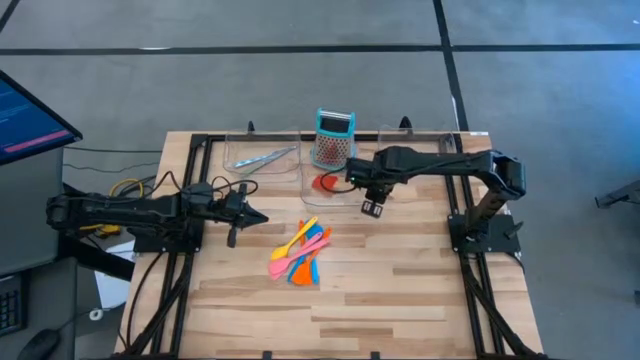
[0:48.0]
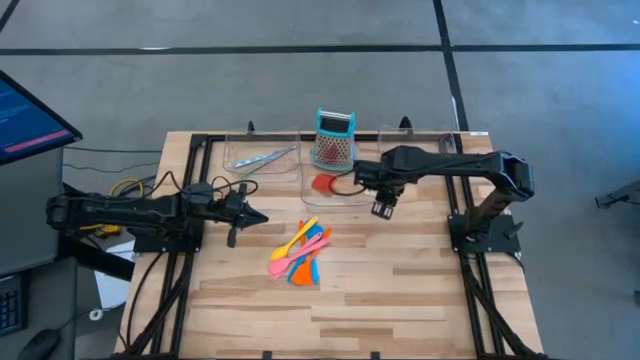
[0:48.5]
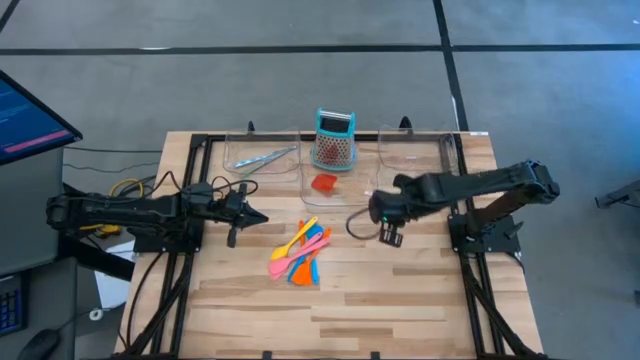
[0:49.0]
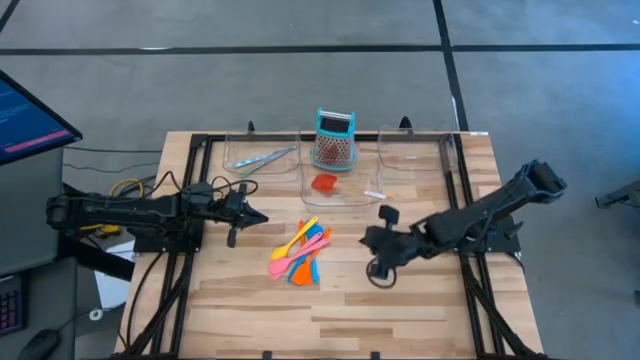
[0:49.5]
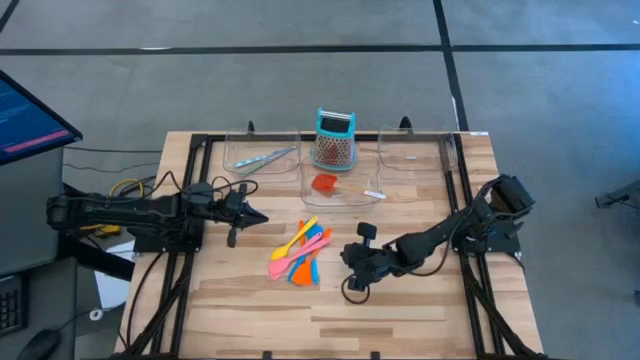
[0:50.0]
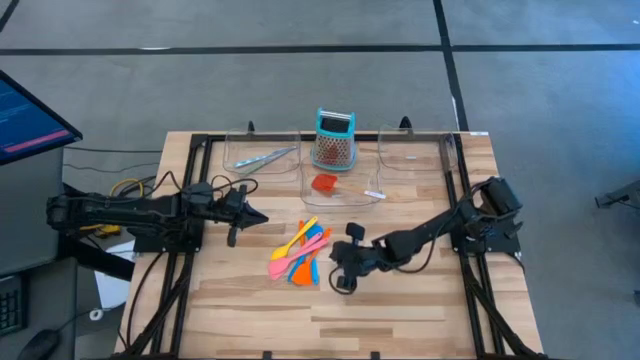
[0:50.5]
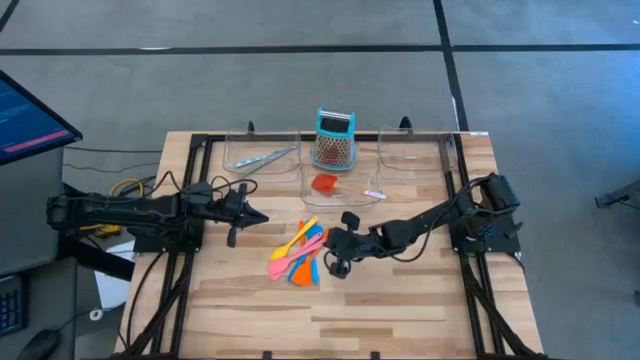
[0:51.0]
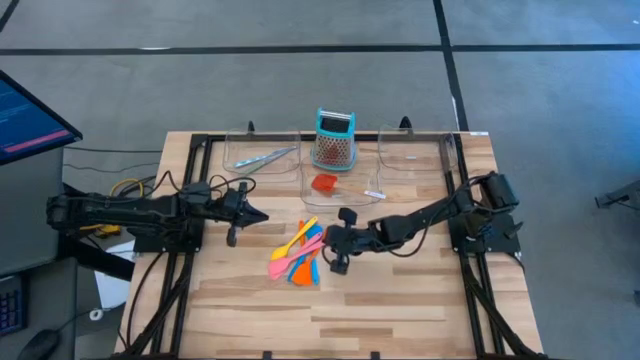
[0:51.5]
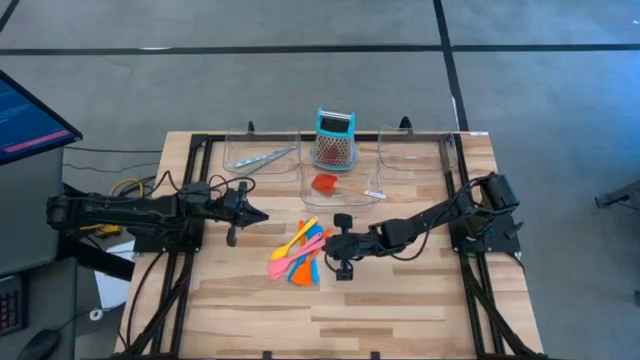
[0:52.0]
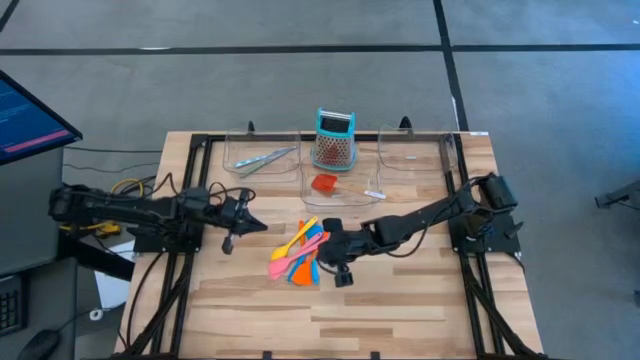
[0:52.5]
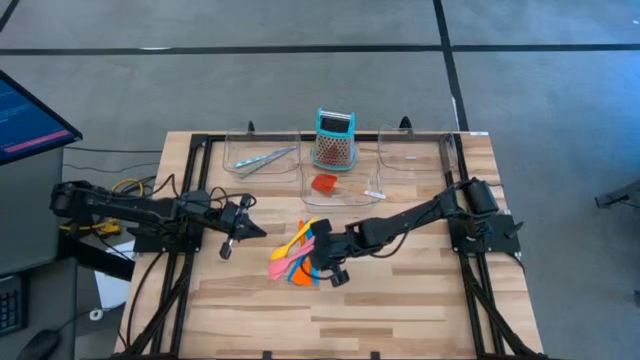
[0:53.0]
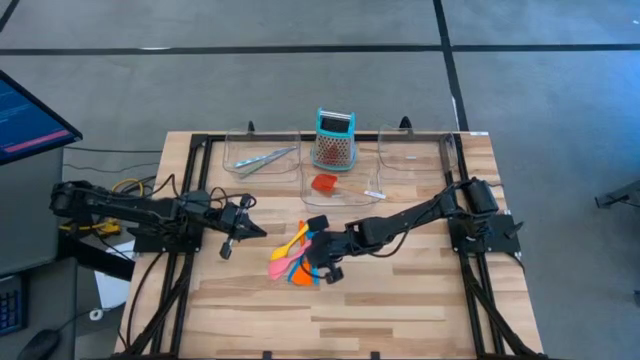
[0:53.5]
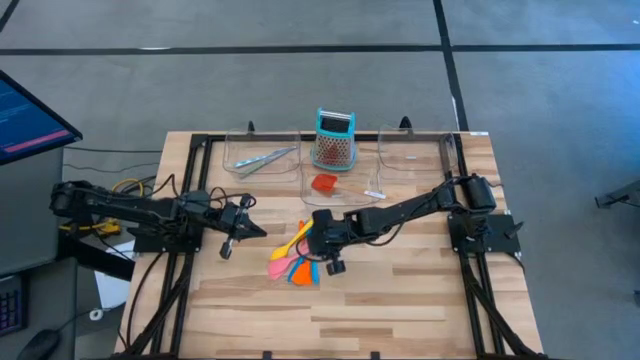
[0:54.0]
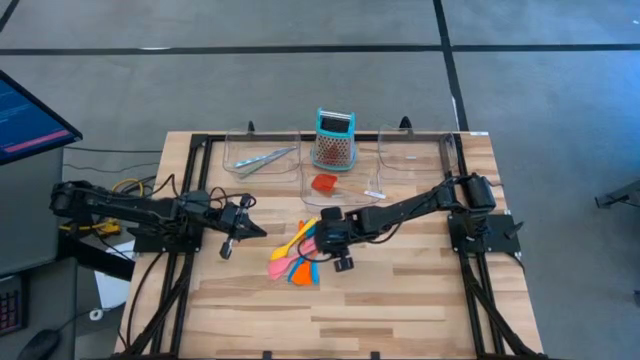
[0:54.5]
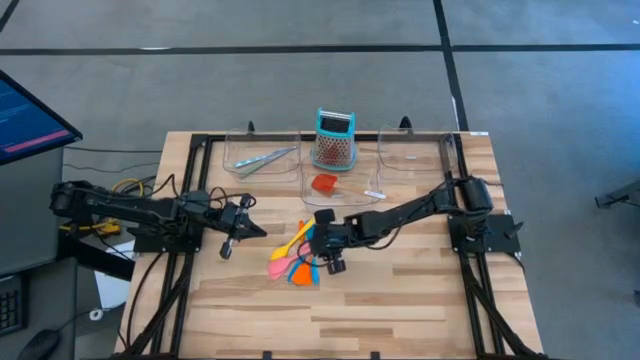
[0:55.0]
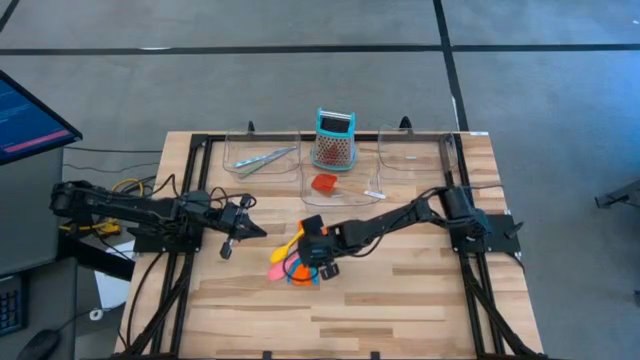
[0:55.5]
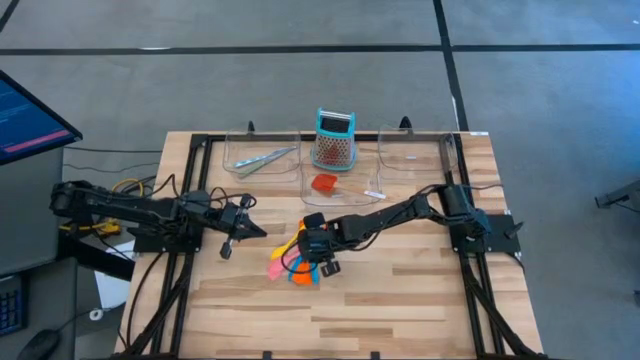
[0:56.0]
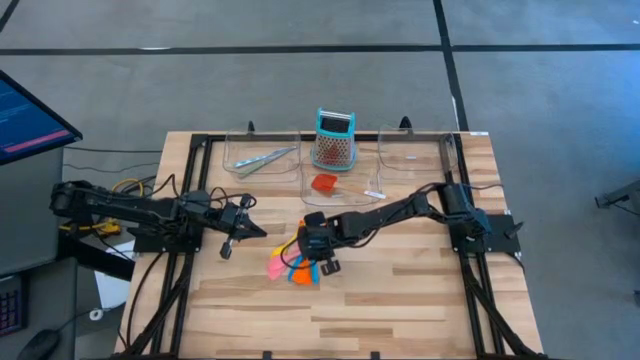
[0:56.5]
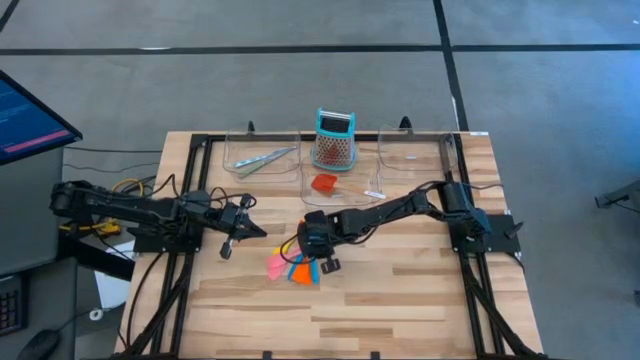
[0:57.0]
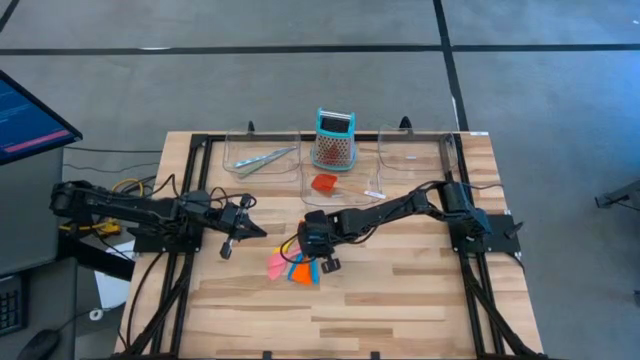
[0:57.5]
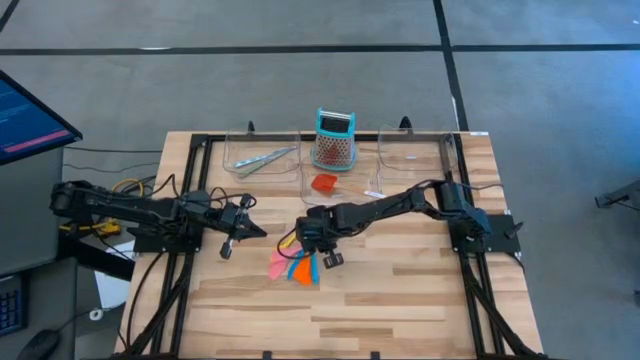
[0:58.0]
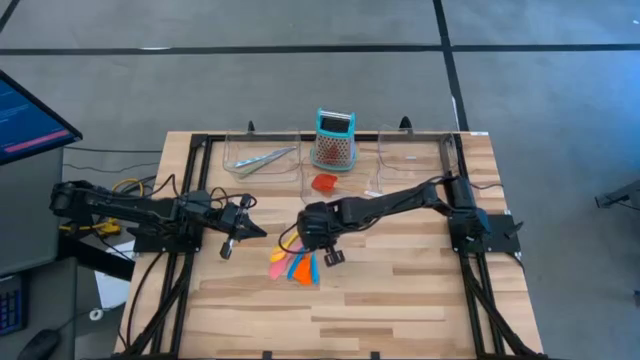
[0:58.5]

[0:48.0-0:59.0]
Task: Pick & Place Kitchen Items
Put the pink spatula into the middle transparent bin

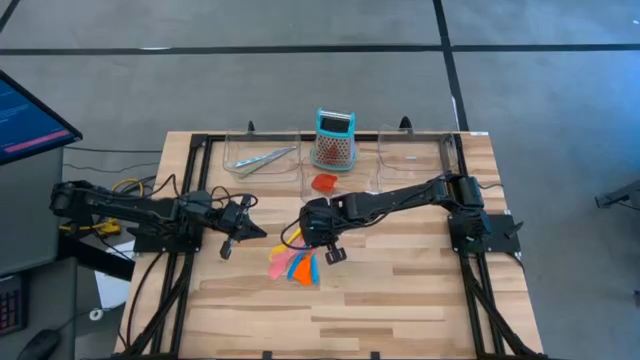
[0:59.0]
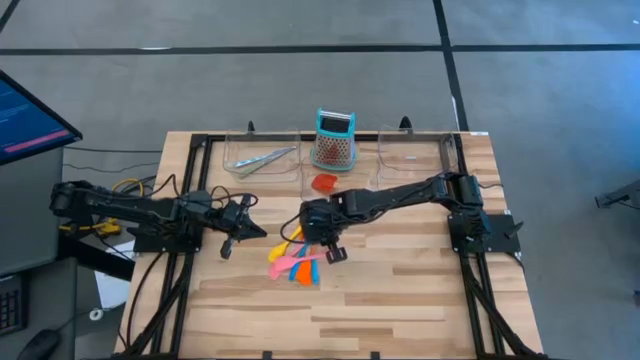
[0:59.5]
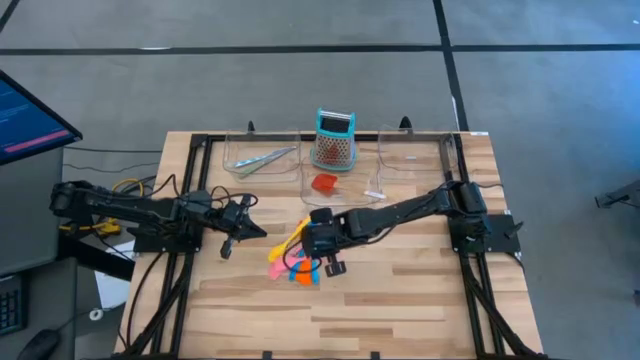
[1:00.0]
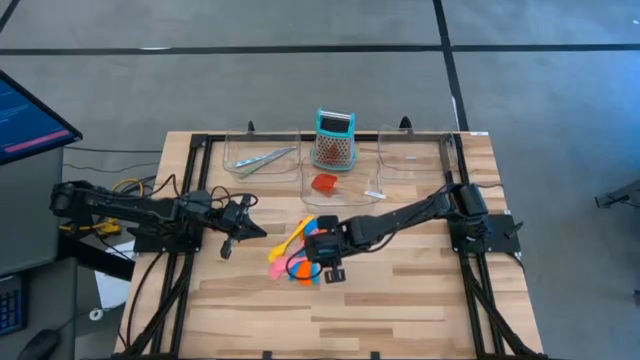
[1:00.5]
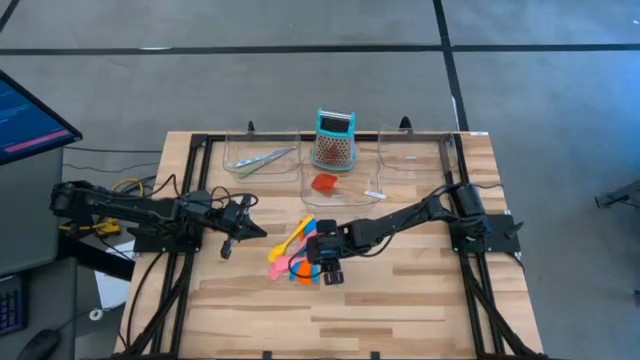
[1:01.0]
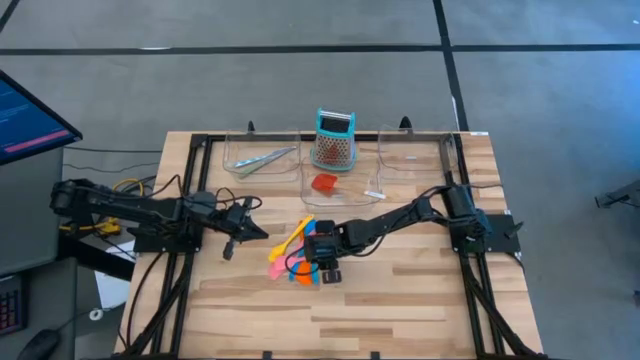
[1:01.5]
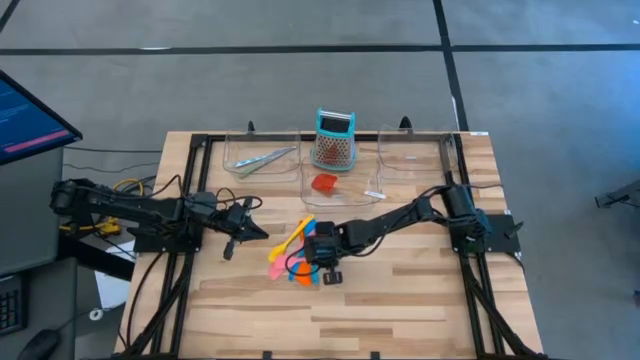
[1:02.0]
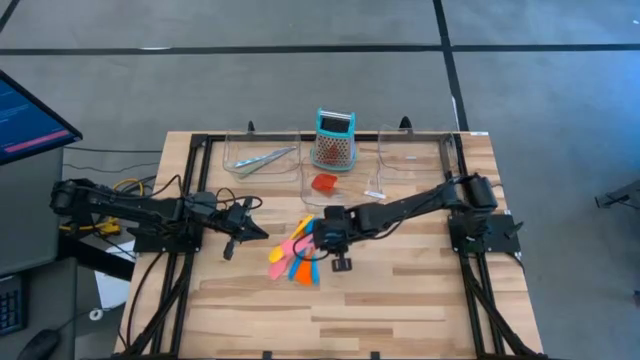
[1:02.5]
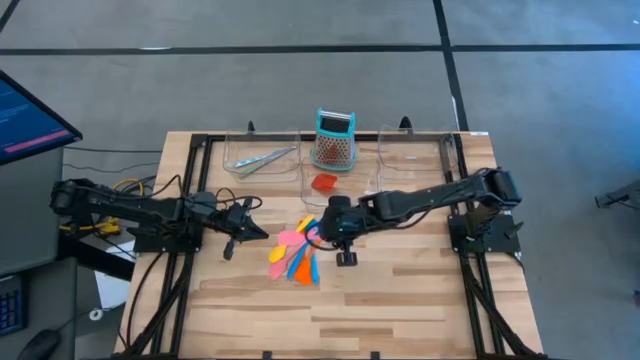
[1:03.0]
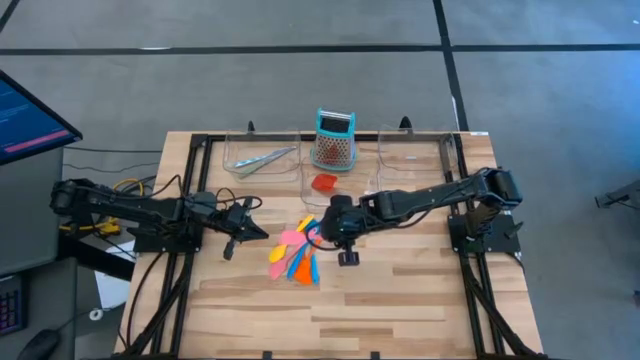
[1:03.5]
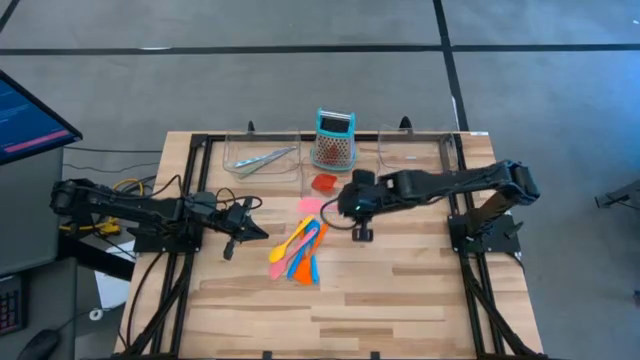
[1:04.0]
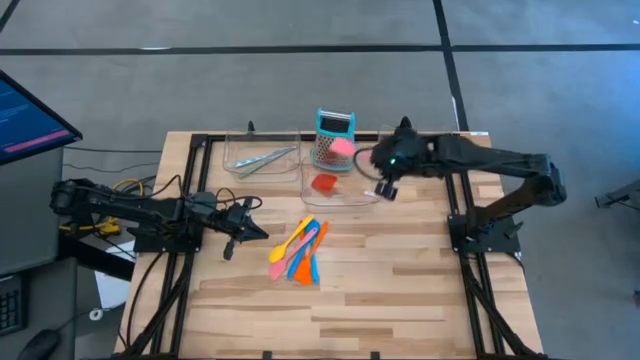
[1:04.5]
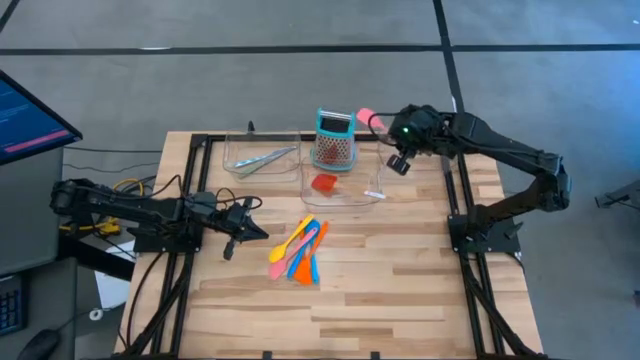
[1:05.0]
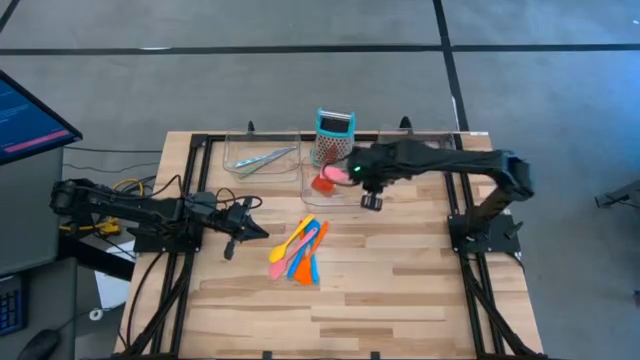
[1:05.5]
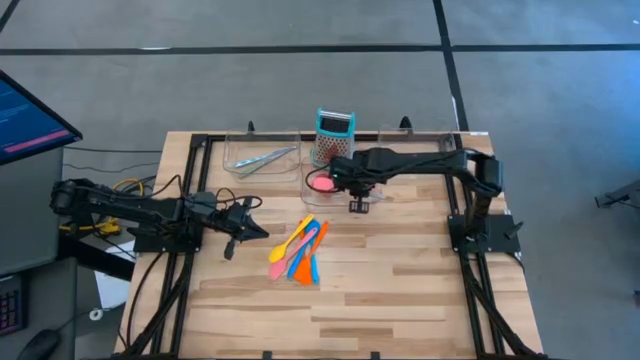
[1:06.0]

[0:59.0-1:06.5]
Put the pink spatula into the middle transparent bin

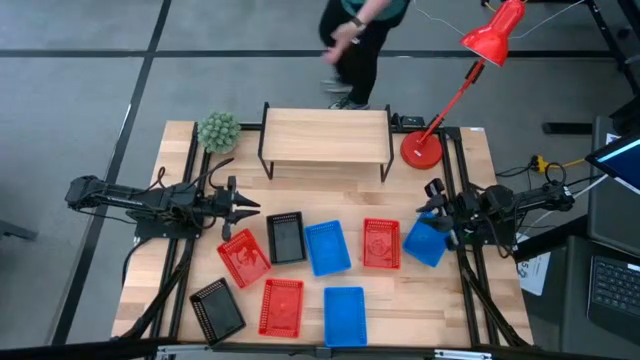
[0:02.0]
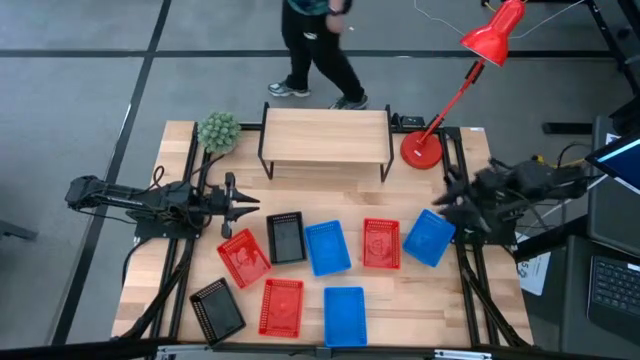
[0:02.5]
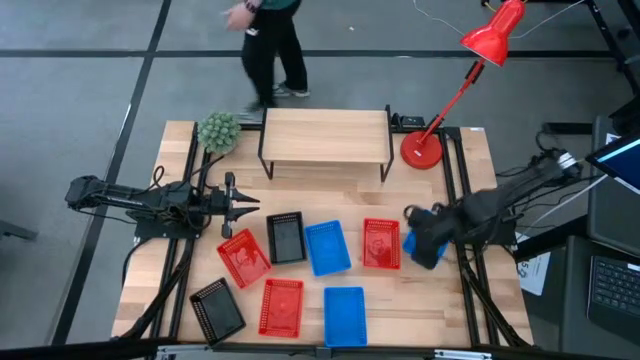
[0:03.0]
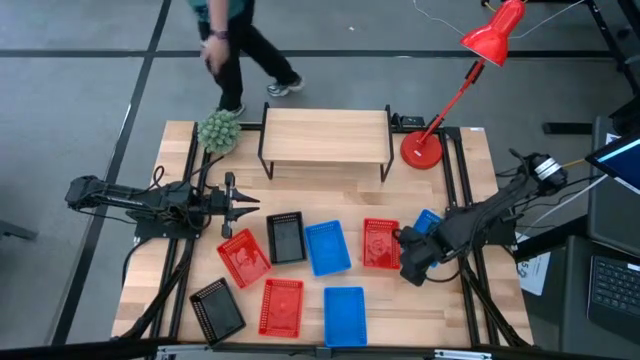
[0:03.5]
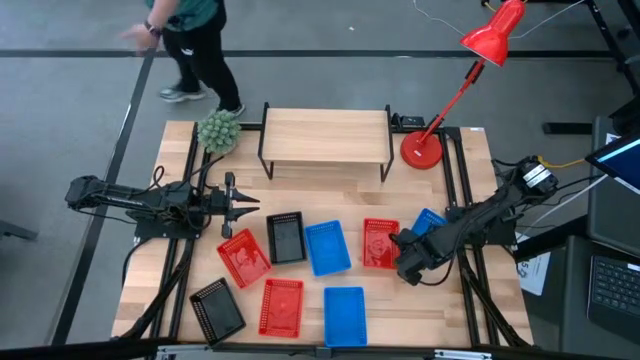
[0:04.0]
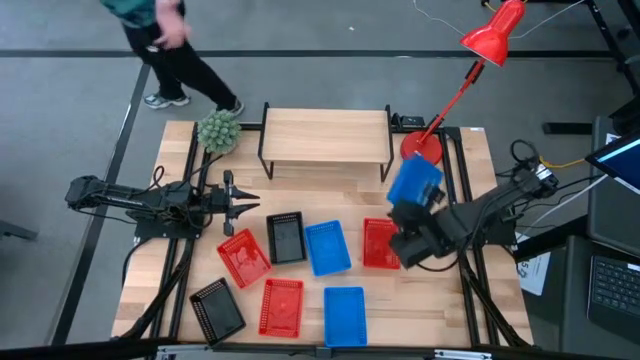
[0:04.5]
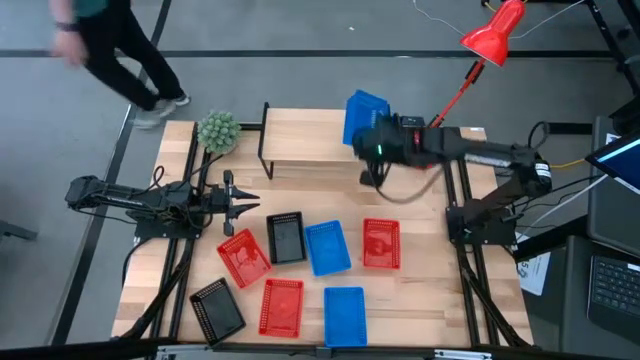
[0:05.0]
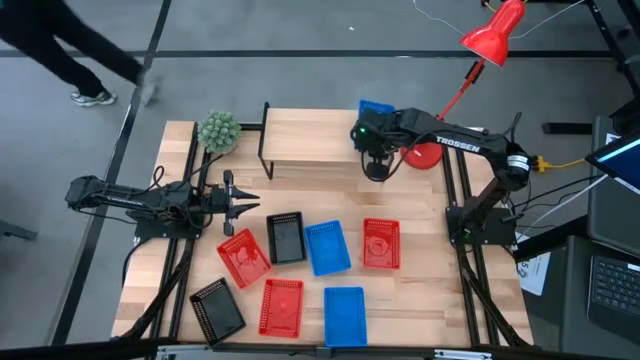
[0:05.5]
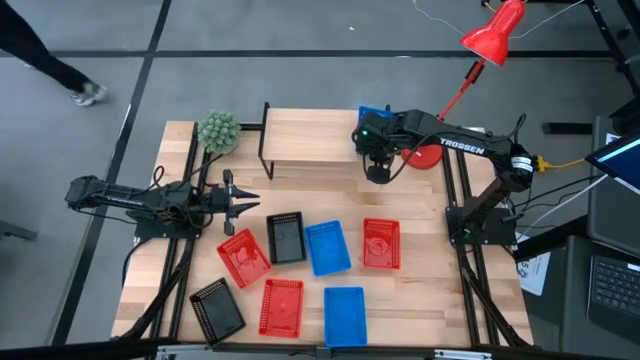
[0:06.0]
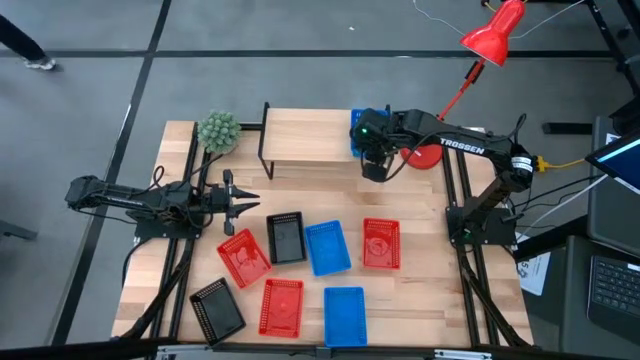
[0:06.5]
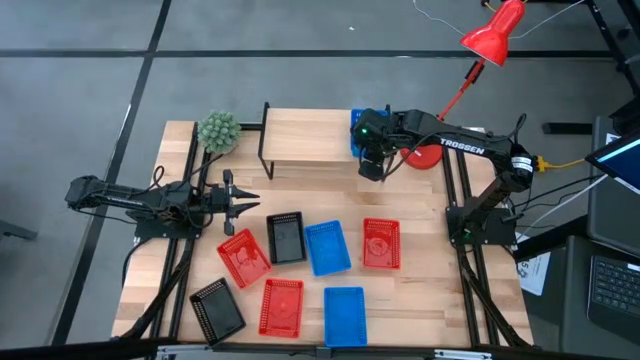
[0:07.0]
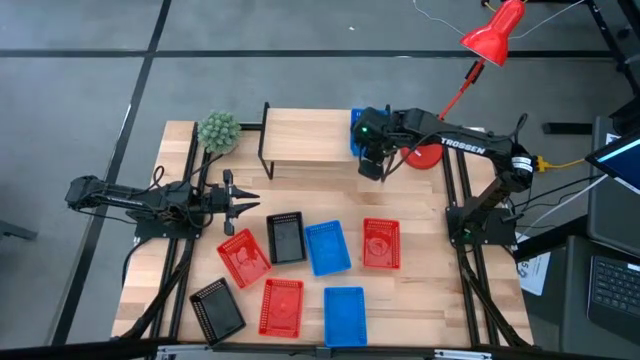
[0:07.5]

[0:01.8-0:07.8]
Task: Stack baskets on shelf by color
Put the top right blue bin on the shelf
